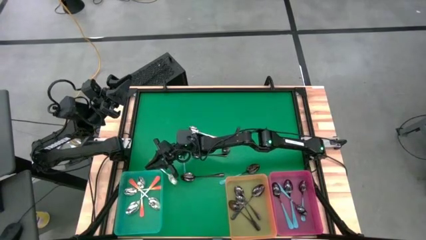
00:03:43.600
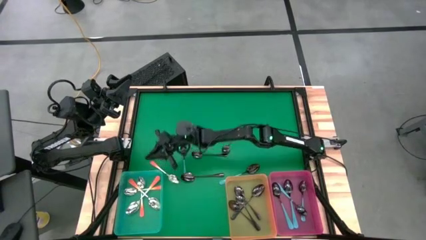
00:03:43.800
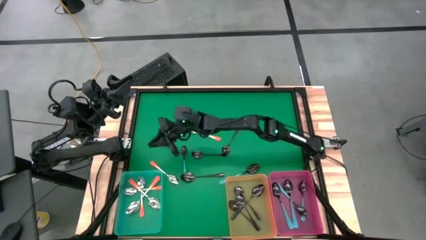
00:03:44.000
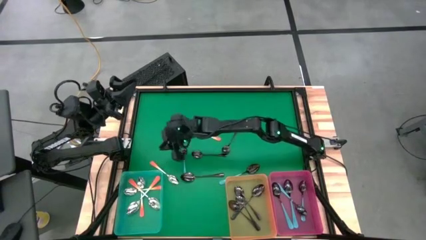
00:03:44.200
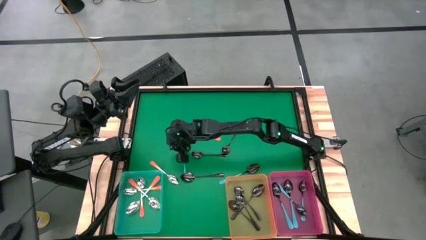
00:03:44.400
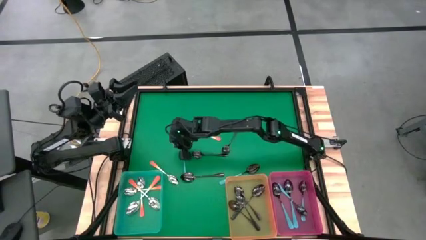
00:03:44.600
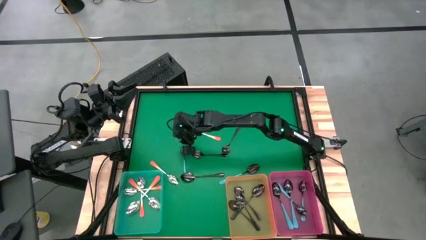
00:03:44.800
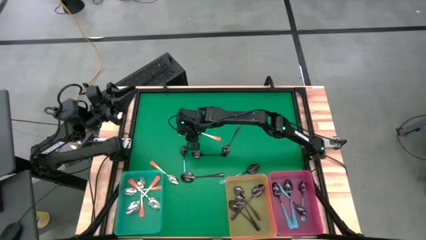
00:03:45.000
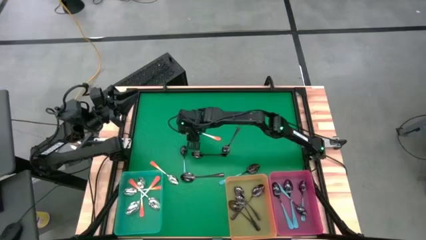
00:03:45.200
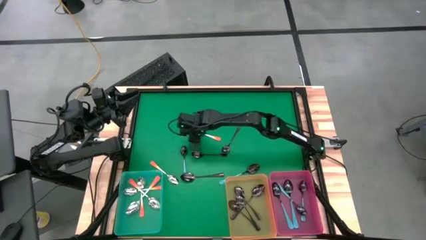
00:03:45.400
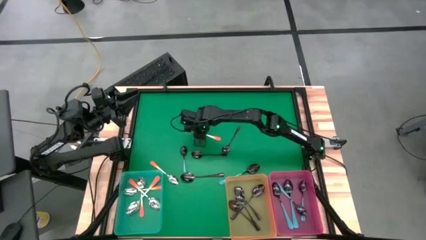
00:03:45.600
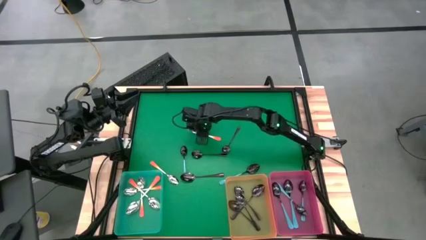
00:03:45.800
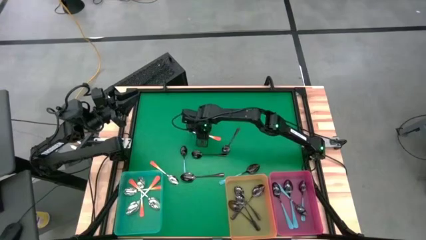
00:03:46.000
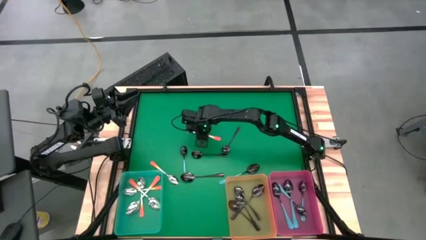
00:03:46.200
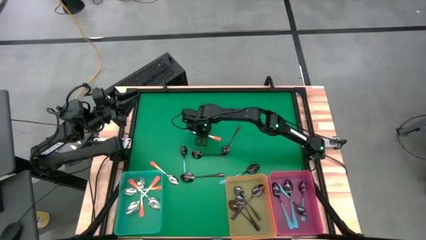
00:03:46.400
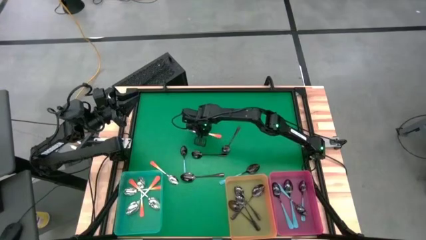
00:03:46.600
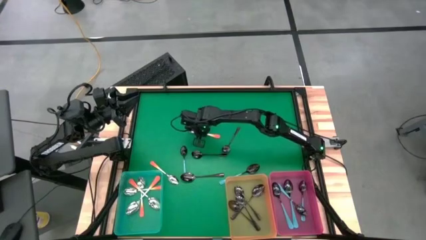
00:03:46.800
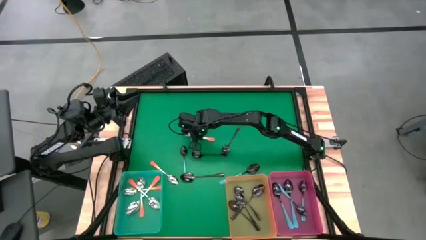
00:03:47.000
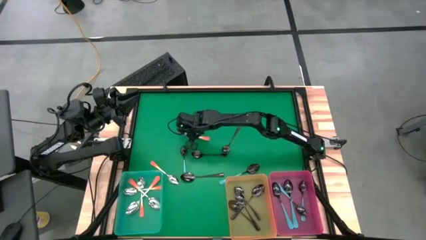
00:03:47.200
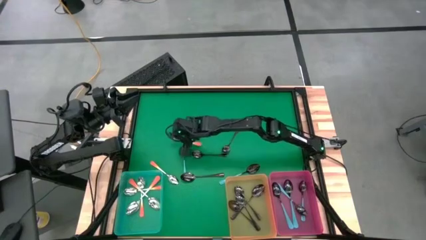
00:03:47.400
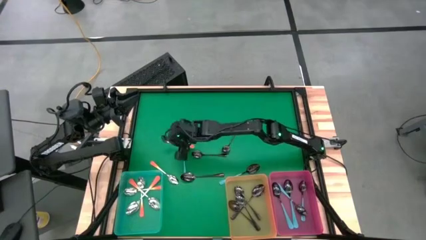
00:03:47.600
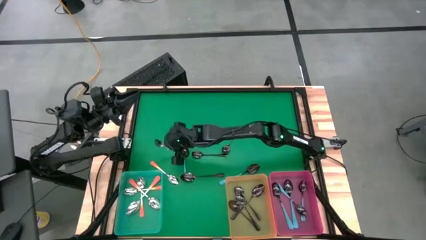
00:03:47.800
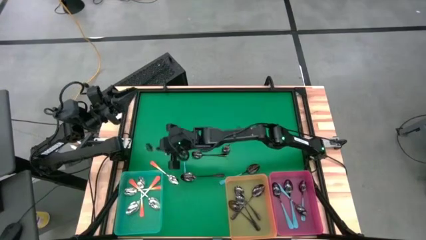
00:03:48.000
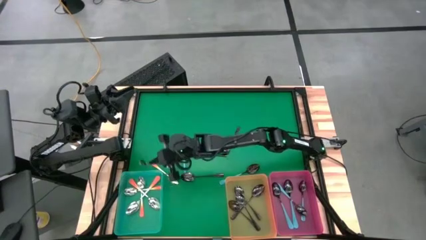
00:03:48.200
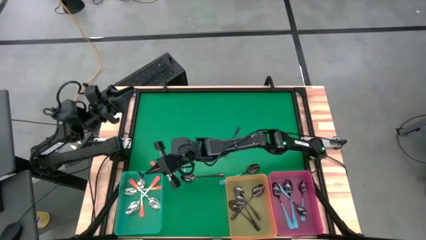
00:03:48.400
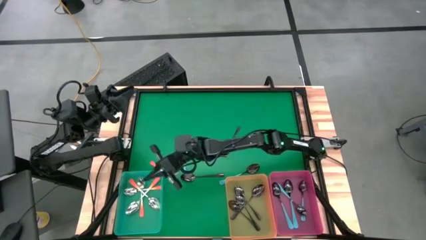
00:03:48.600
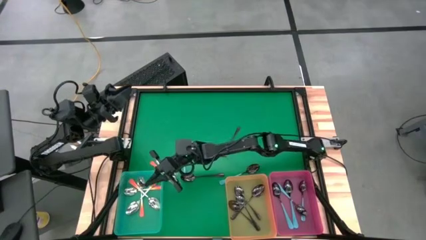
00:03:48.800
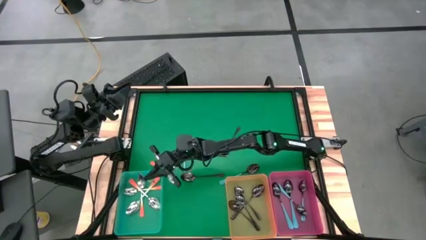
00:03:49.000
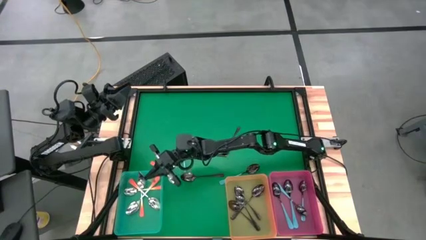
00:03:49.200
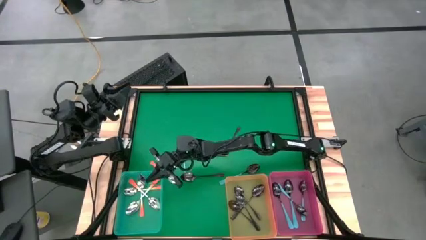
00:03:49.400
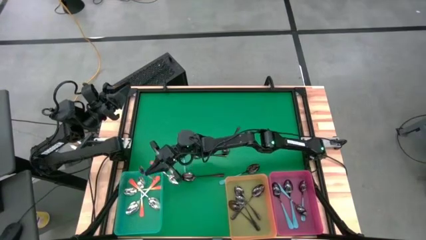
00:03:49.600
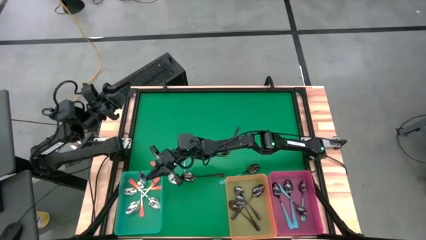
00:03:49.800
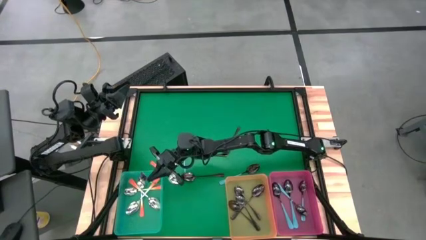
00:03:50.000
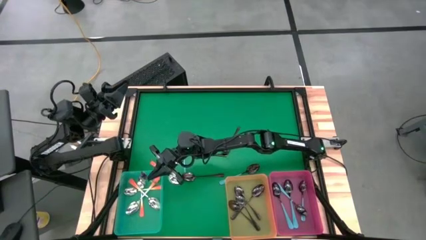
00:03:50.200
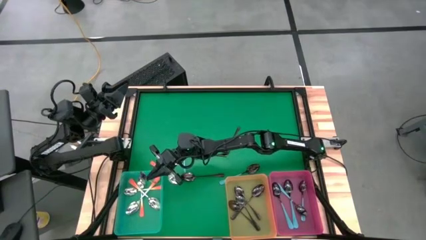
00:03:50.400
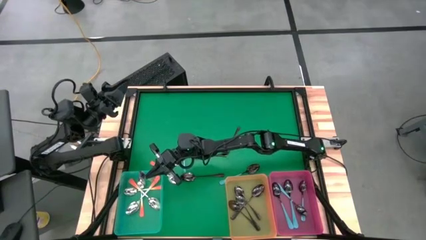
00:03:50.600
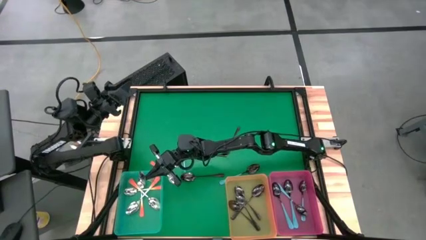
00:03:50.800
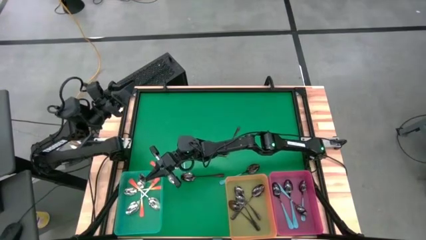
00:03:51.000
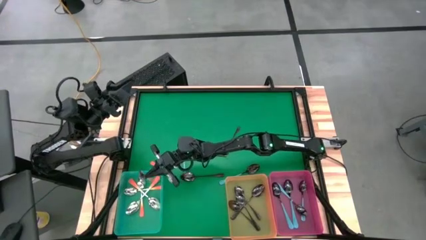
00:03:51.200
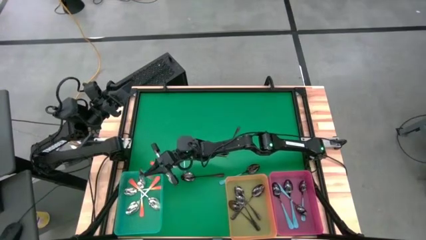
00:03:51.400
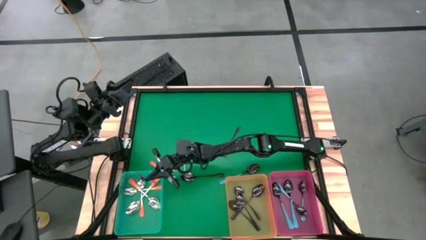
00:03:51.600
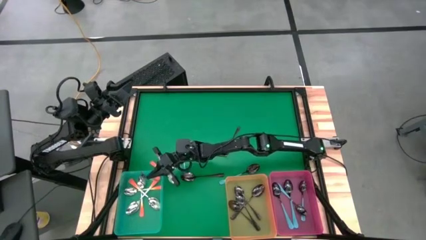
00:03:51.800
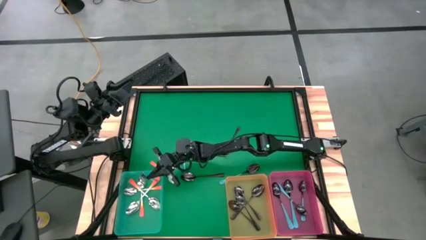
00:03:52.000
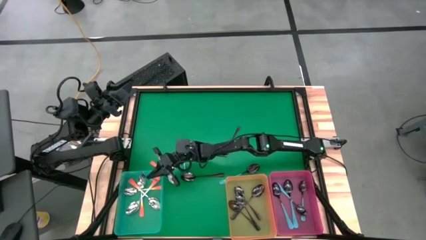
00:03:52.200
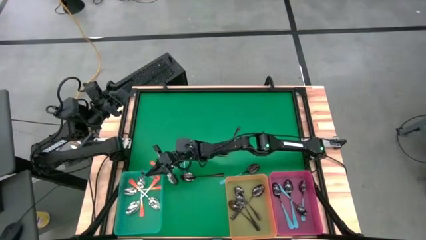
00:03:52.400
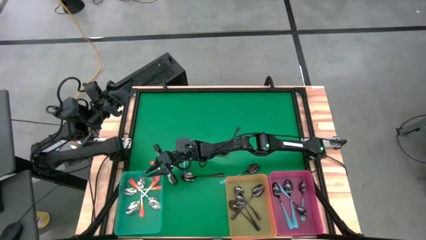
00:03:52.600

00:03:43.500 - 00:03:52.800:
Task: Sort silverware by color (type)
Put the orange spoon into the green bin

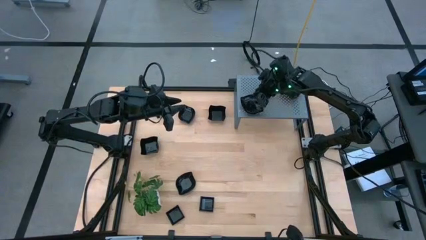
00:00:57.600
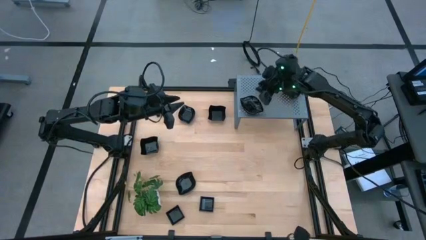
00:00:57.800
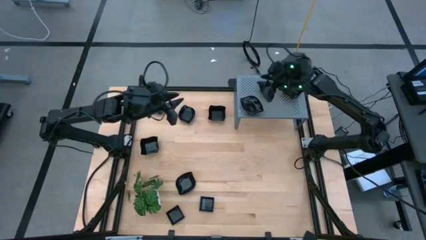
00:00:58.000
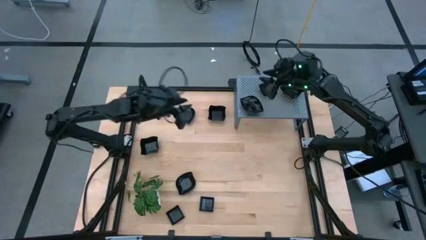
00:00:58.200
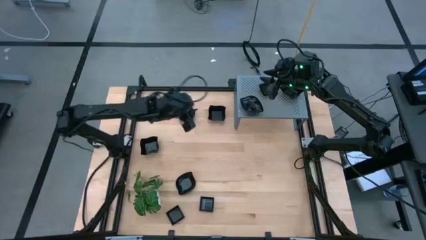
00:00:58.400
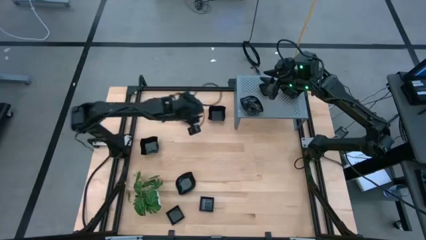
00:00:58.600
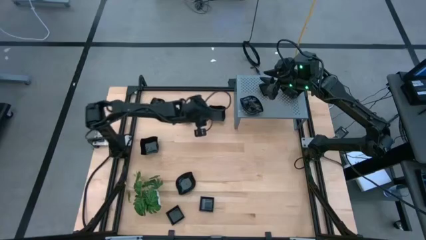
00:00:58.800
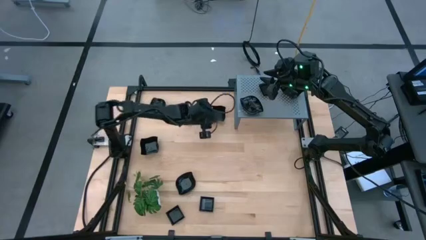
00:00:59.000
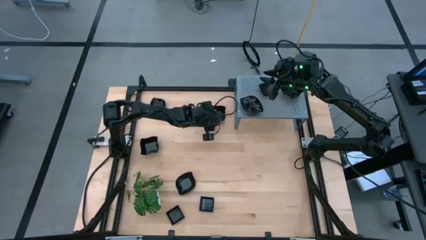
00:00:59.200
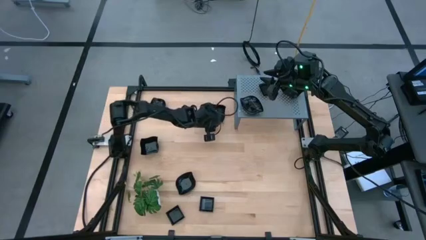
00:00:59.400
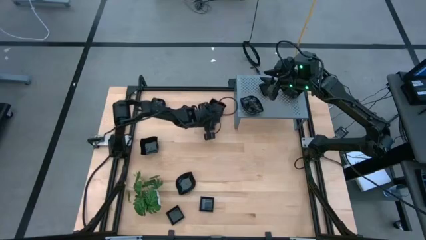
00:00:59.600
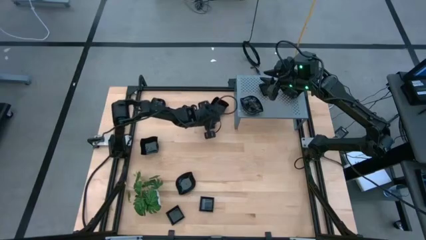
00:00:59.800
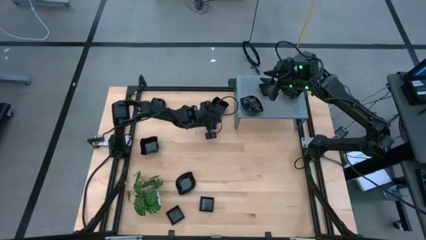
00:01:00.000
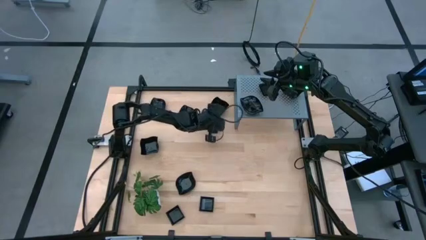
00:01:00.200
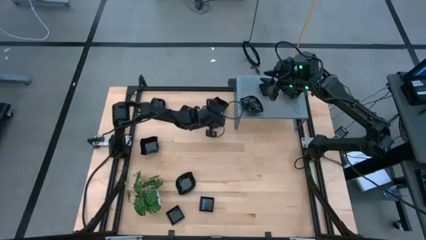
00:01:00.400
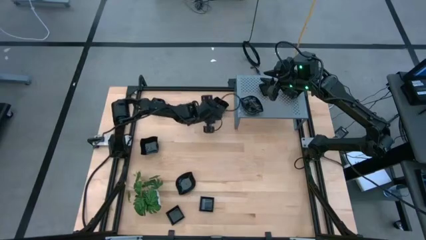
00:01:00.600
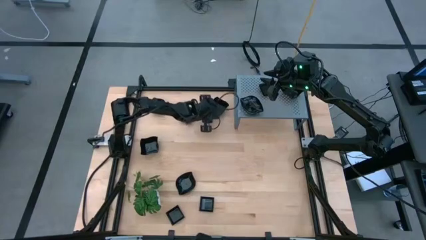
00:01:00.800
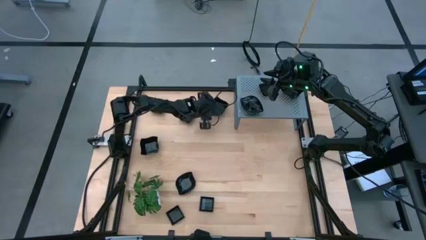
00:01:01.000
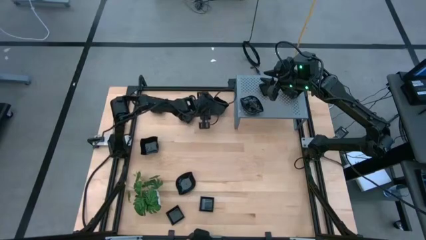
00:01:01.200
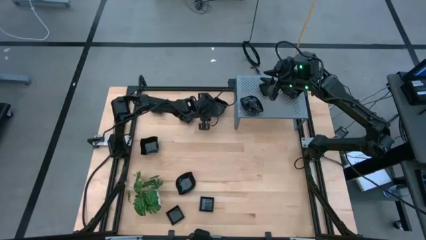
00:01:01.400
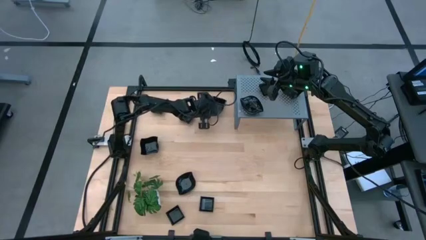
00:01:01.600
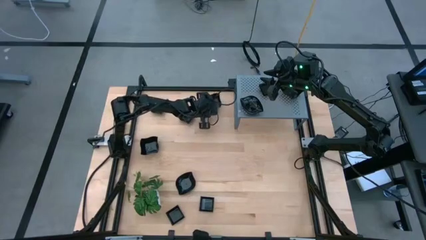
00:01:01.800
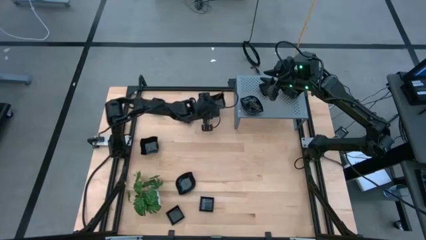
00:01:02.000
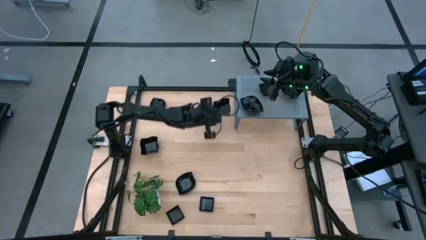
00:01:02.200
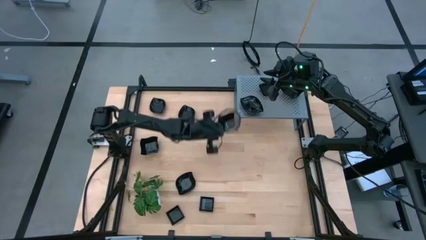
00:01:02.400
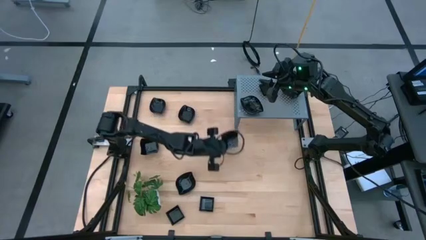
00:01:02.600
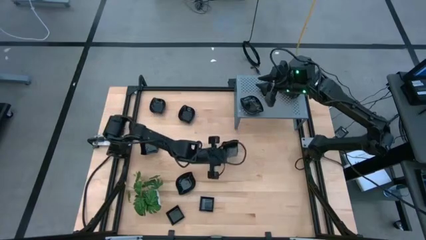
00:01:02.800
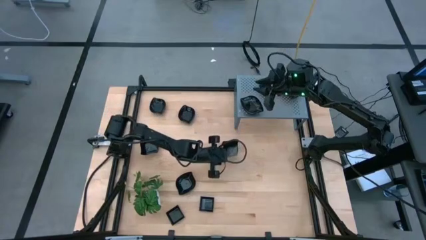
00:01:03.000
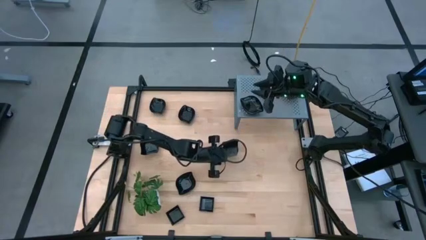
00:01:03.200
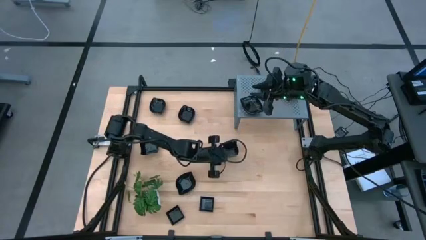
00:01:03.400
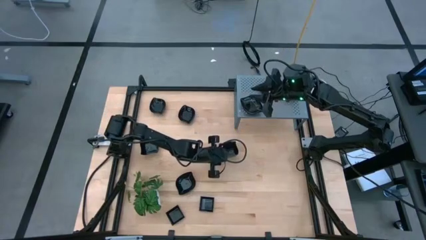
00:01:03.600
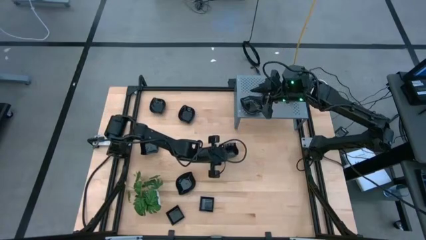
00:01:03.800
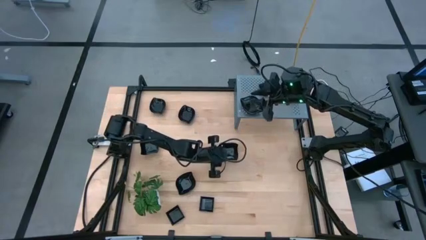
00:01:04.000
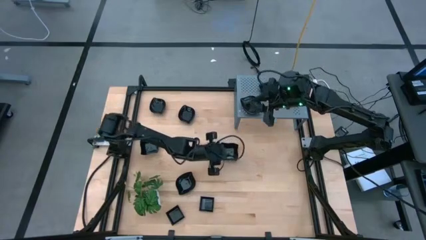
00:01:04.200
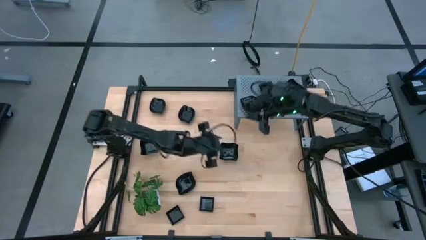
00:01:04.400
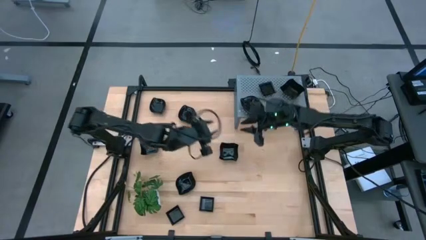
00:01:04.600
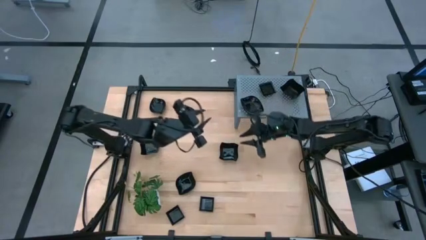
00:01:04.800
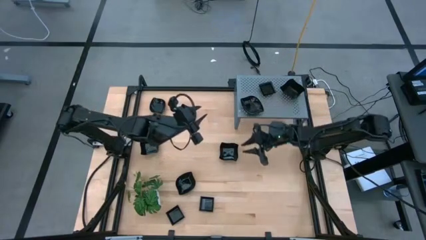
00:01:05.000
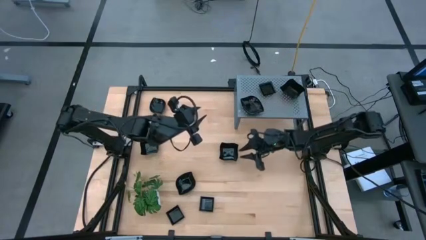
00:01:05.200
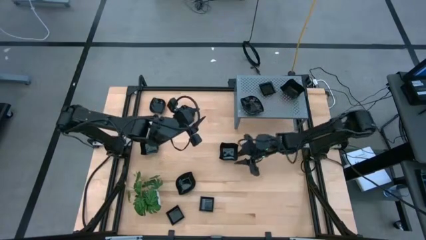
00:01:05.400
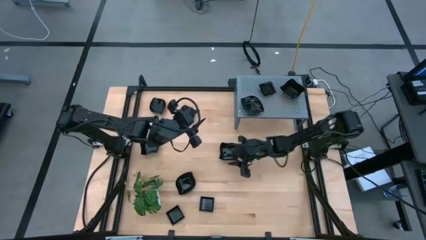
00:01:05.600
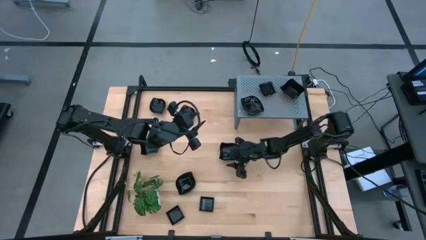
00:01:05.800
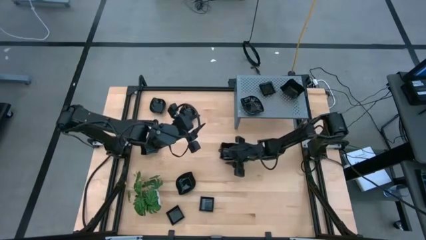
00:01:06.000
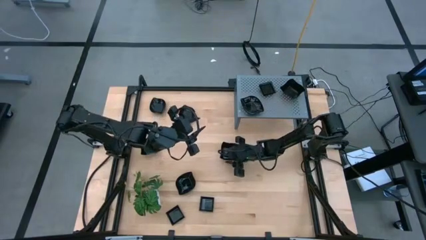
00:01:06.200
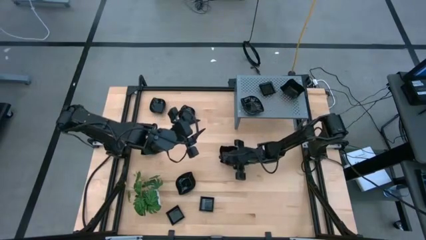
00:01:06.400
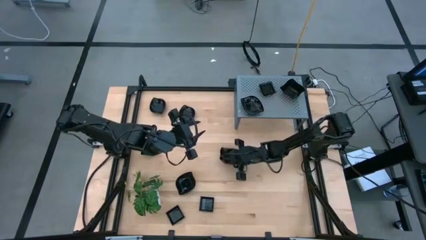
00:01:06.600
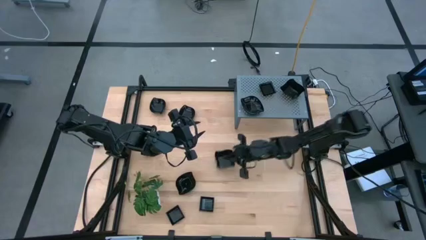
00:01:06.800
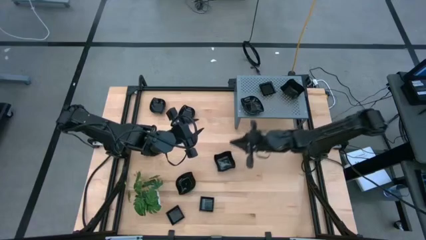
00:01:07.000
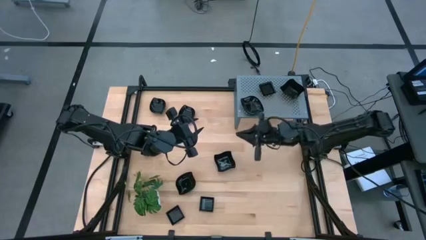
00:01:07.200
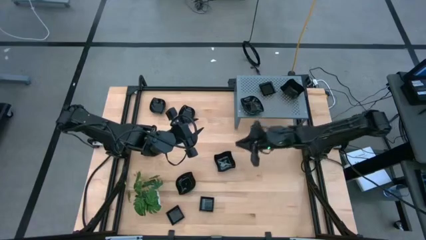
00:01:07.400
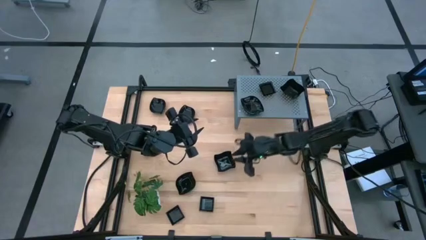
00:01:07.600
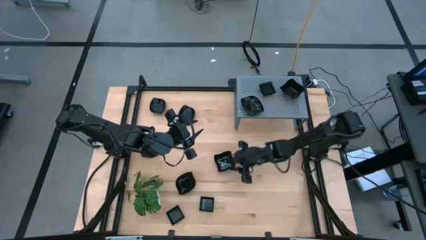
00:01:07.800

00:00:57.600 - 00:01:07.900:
Task: Pick & Place Mini shaped plates
Stack the distorted square plate on top of the other distorted square plates
